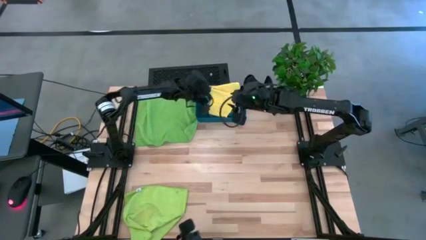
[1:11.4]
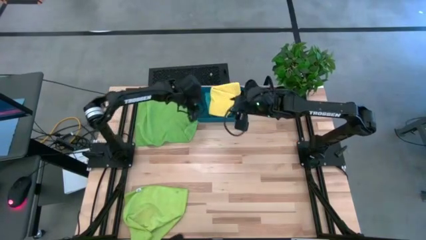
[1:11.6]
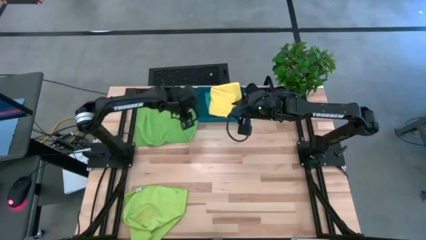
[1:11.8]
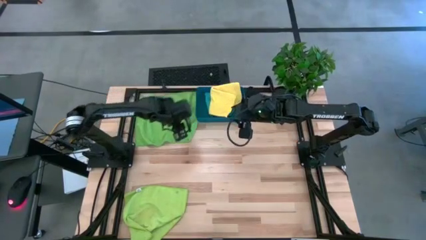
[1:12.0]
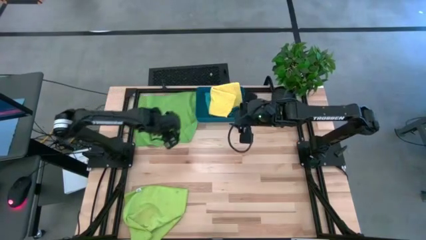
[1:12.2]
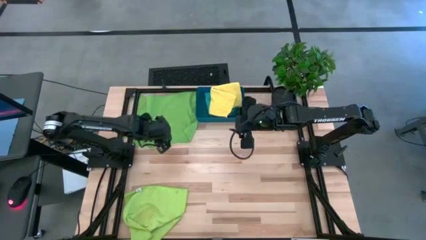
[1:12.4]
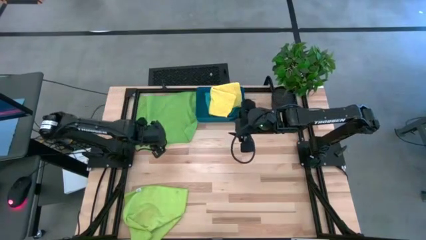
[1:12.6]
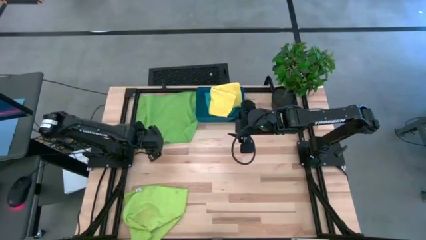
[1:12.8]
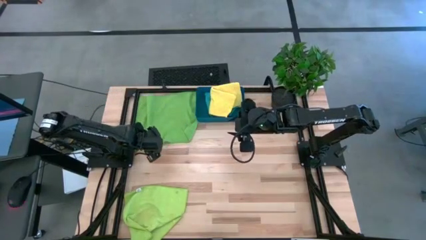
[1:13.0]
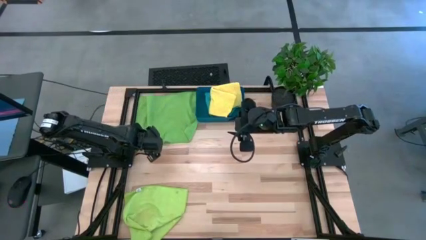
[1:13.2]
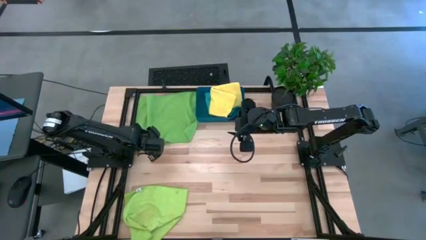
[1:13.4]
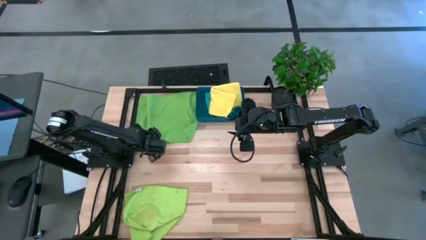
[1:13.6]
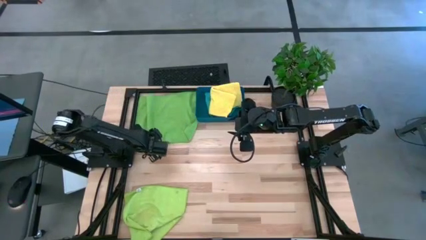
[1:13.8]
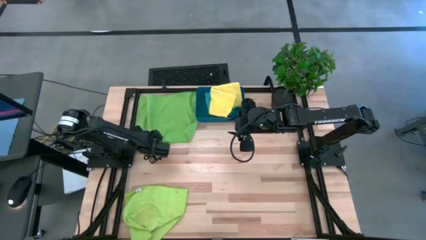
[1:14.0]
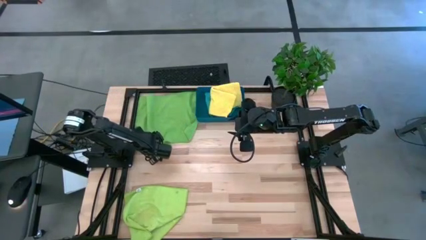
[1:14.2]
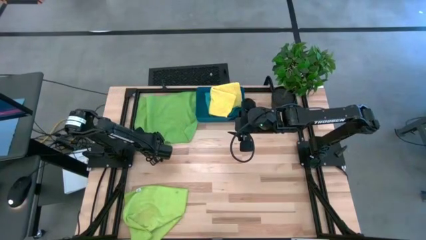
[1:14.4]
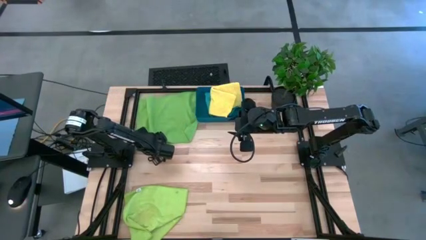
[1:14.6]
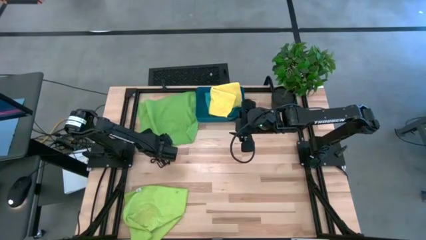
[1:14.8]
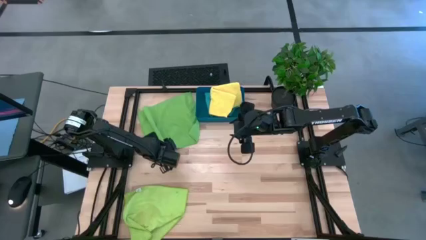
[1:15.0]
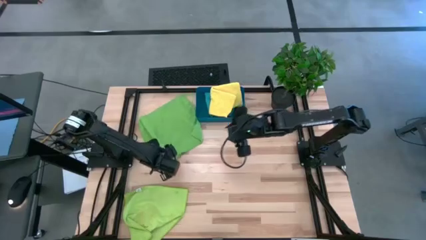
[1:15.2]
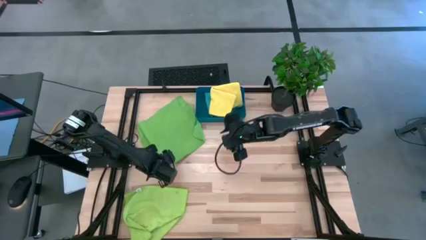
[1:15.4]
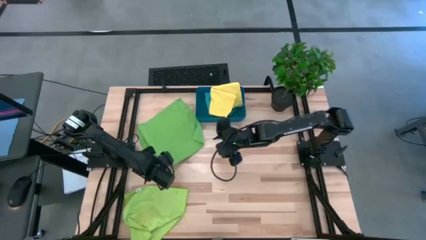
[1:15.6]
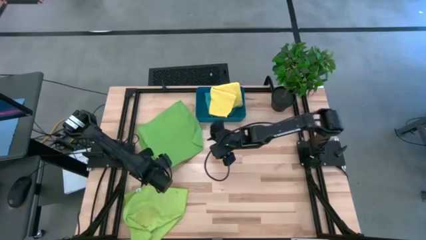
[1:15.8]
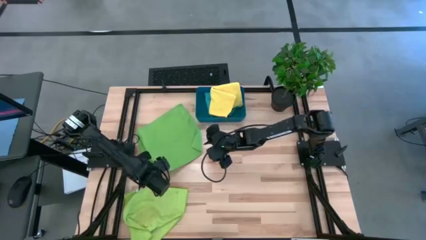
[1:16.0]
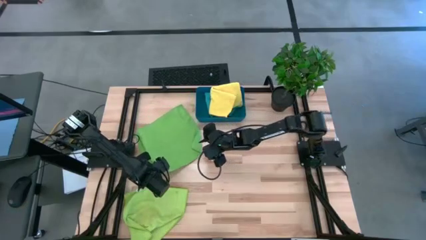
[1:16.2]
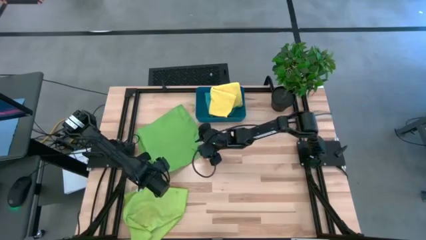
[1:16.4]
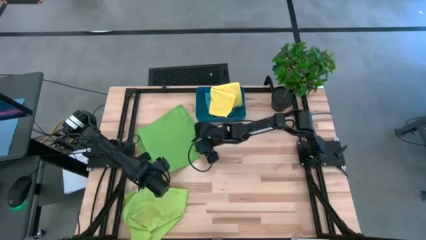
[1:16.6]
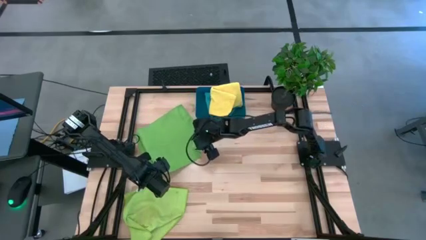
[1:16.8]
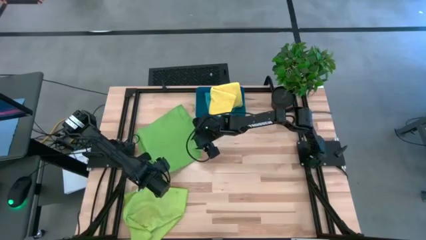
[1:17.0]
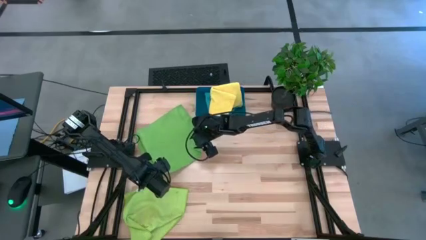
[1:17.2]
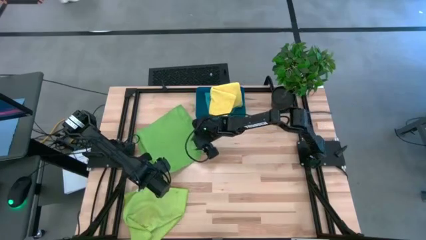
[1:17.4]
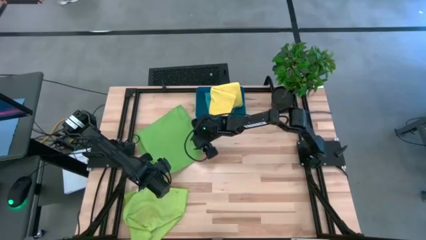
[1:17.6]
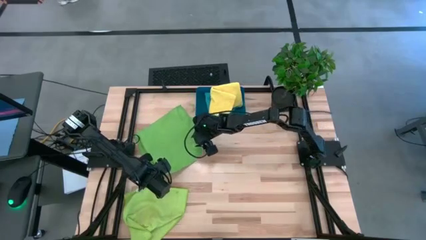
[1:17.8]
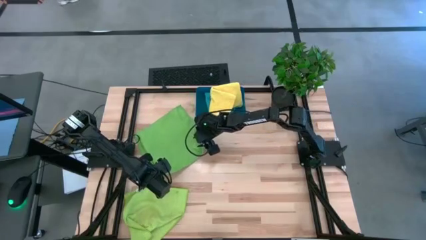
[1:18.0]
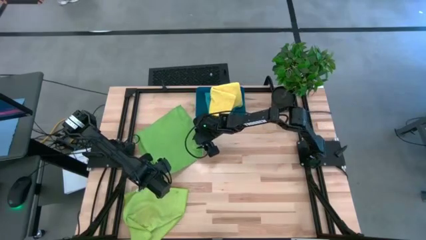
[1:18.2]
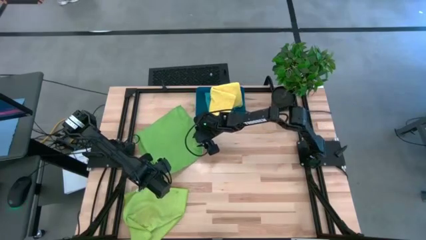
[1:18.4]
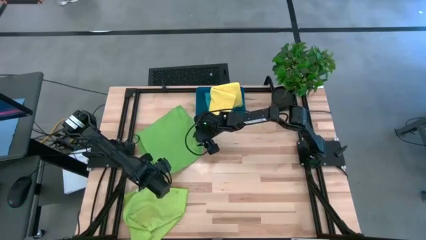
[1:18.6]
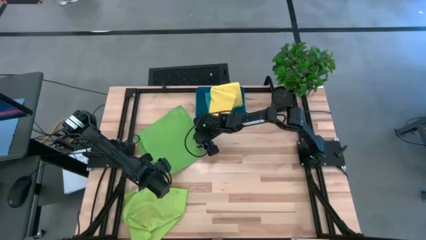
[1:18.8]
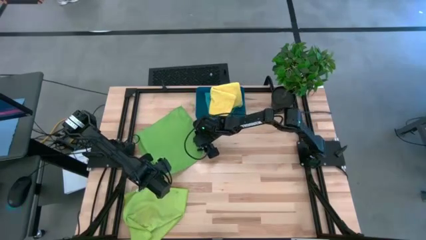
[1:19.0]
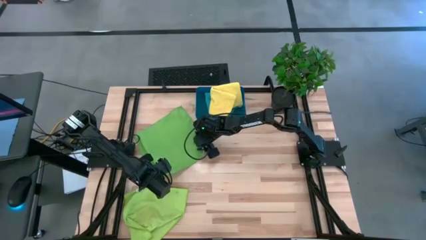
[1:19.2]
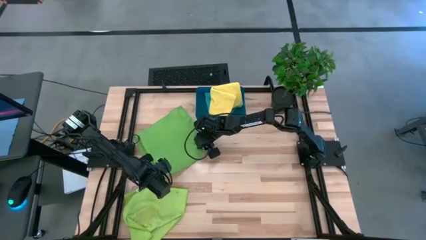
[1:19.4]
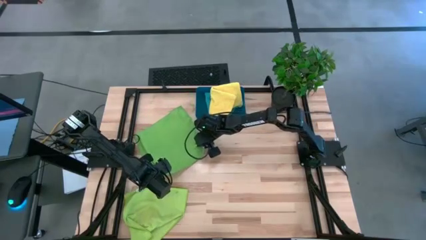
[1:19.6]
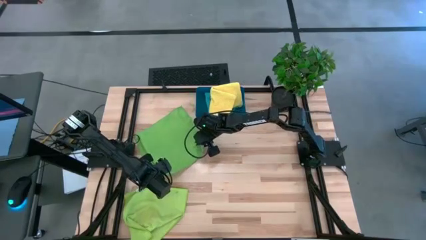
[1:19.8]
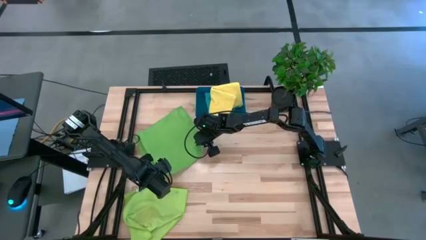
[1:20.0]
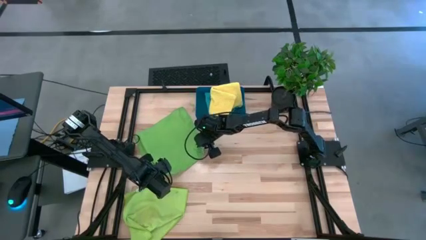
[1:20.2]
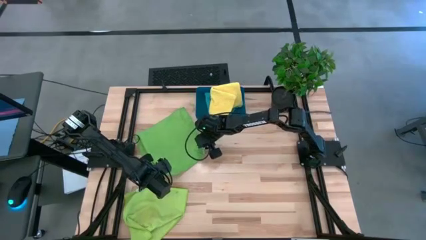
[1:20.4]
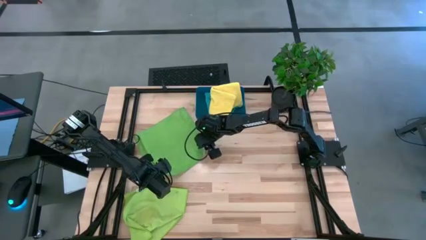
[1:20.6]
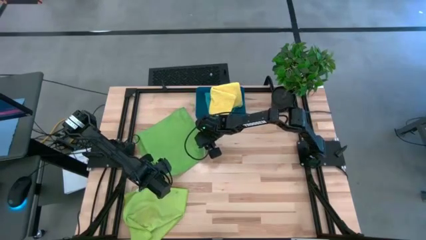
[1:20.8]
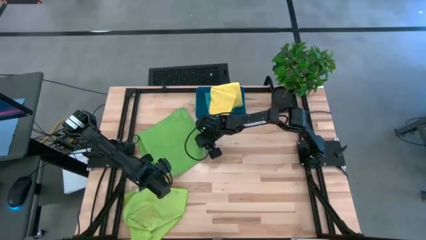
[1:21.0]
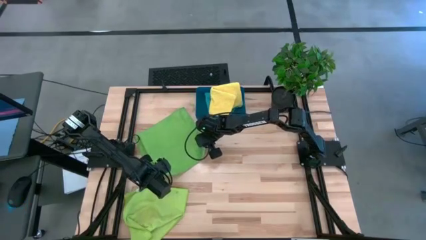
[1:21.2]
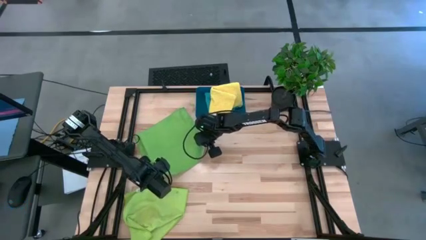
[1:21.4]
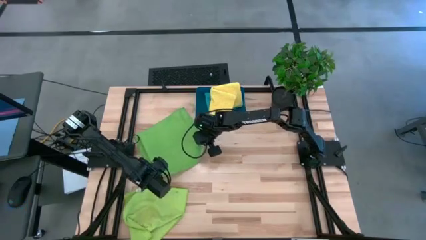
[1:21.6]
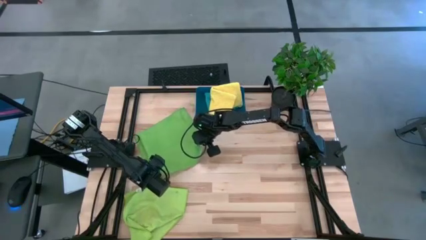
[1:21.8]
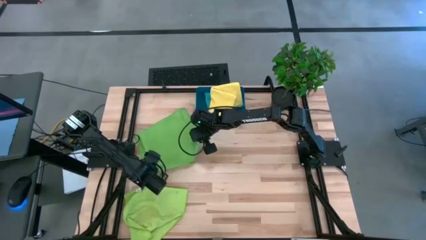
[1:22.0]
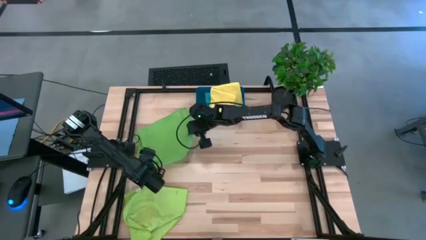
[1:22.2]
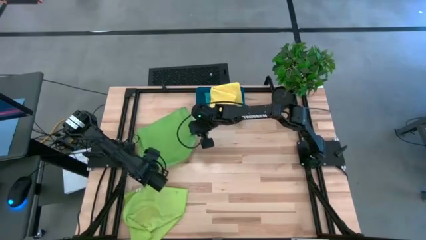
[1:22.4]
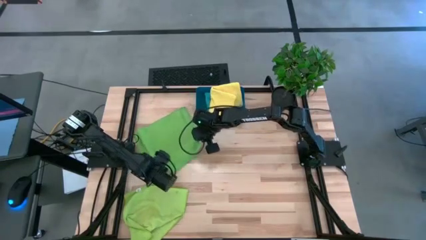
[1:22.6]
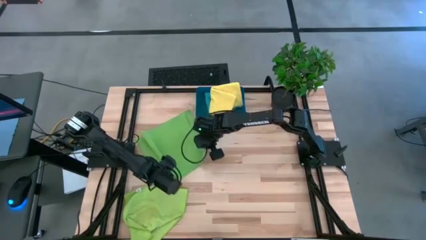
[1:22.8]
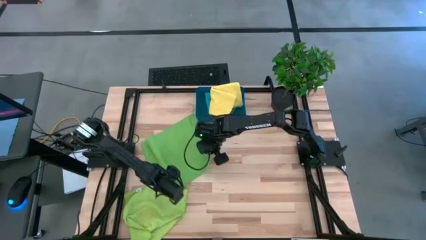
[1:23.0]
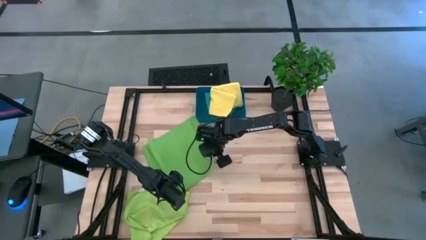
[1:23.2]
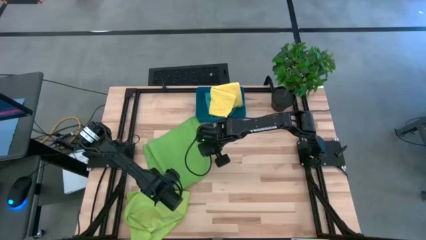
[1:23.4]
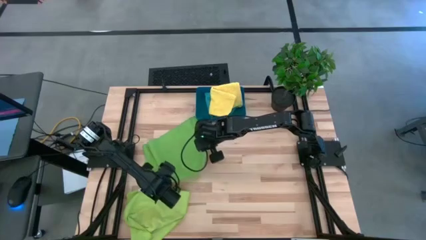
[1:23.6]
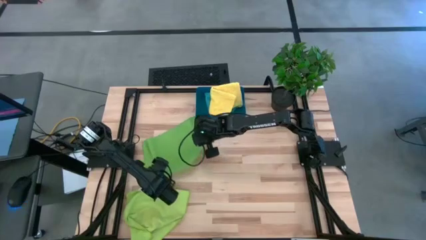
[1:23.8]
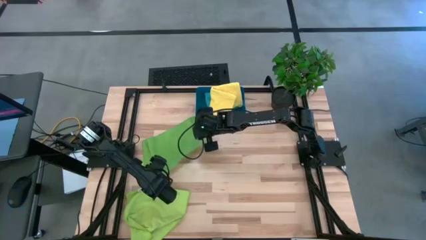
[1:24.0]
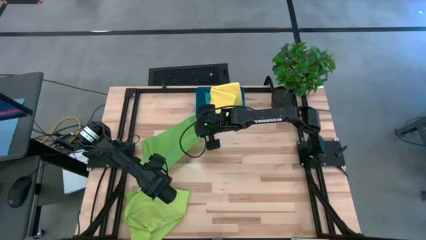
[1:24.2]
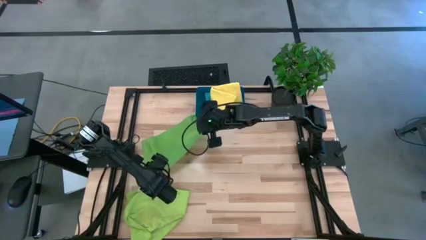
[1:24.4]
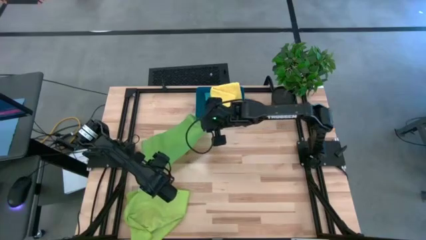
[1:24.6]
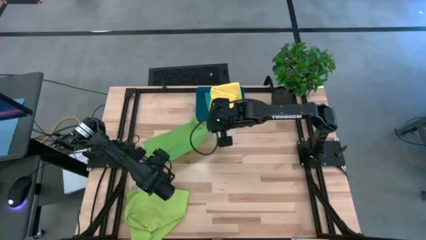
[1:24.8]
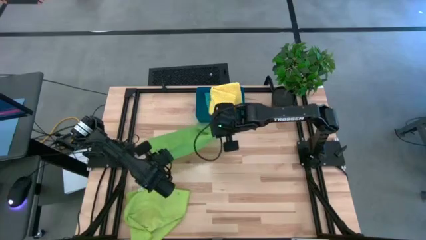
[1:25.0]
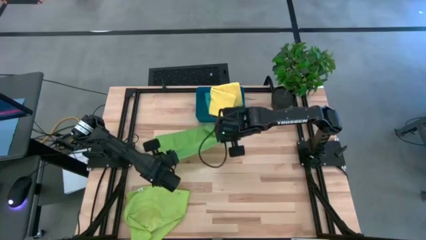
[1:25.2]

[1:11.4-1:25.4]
Task: Fold microfiber towels
Fold the green microfiber cloth

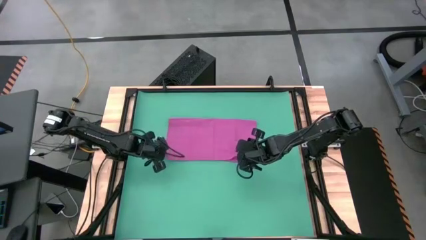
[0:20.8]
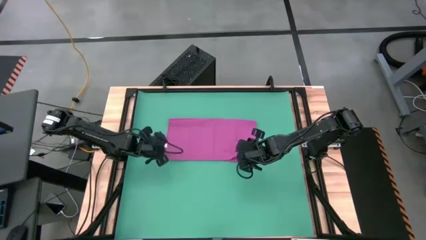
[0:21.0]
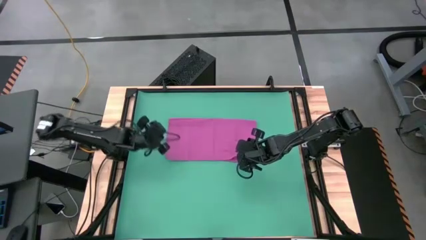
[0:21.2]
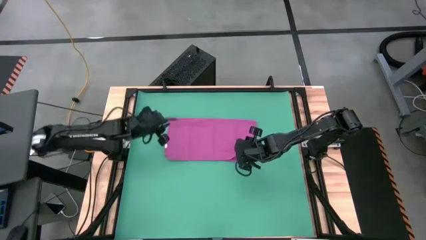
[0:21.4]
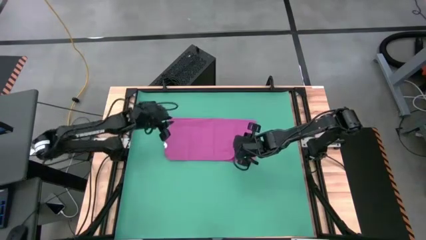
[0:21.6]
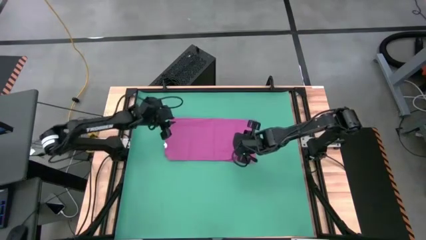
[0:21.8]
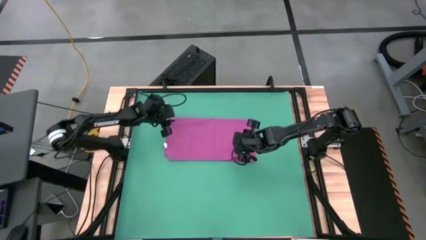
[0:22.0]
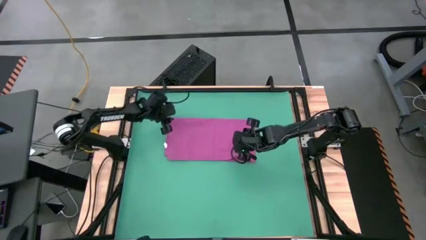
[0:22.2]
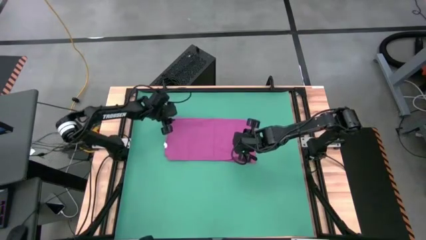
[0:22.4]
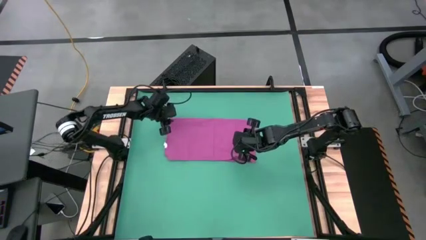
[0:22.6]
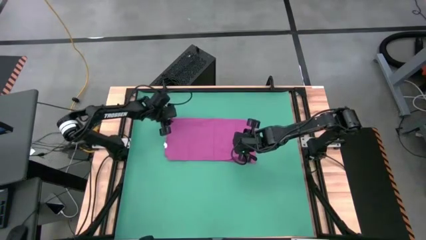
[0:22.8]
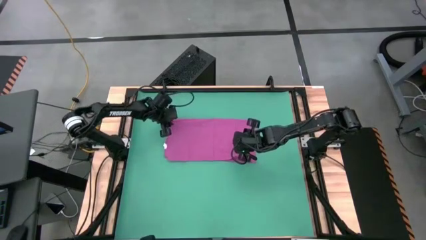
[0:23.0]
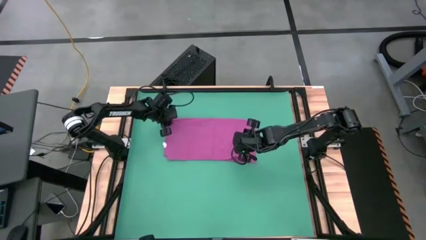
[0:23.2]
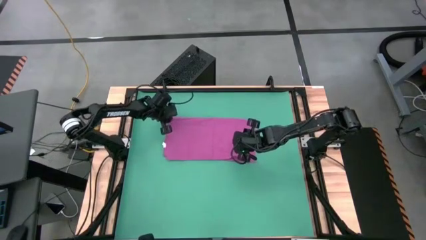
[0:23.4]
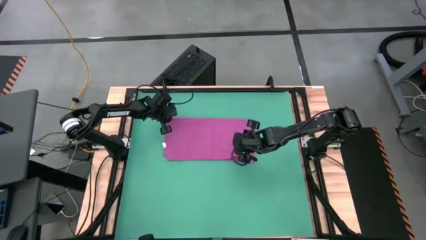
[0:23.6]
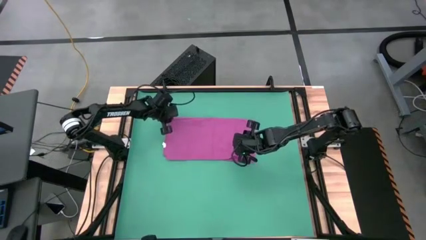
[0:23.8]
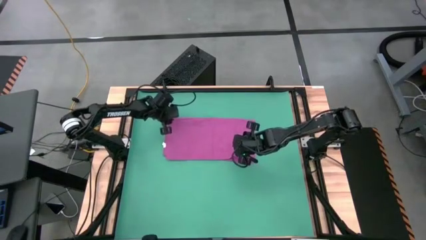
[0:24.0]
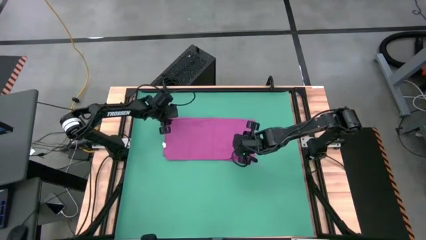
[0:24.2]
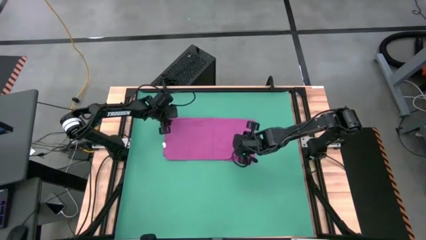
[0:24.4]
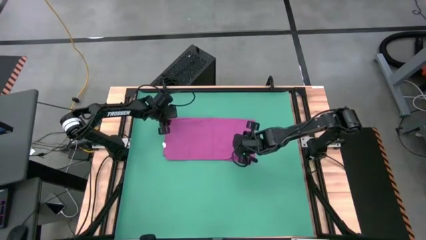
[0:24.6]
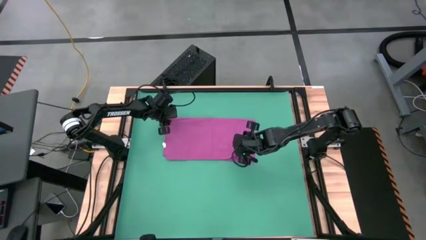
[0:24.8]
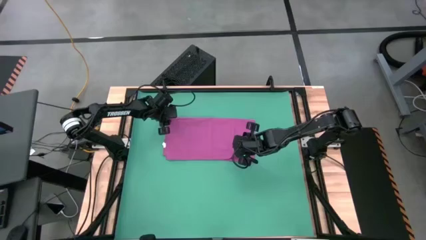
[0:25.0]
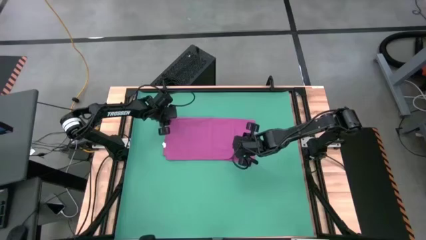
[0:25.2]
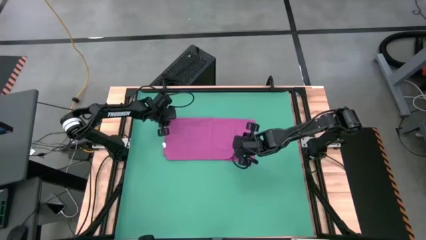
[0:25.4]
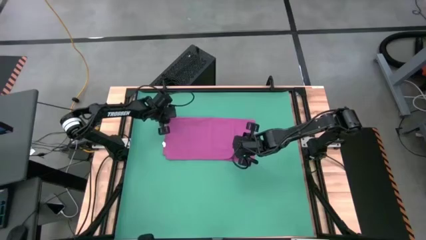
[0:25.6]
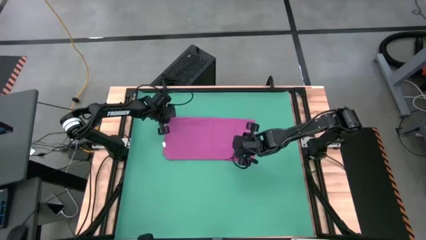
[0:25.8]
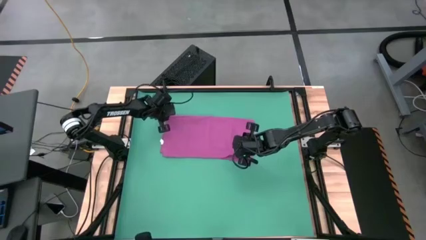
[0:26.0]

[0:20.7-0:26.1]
Task: Roll towel
Roll the pink towel
